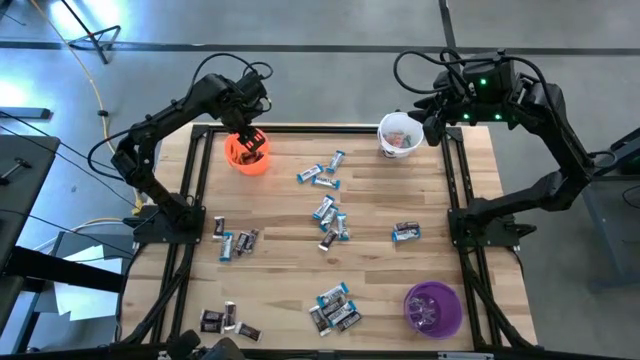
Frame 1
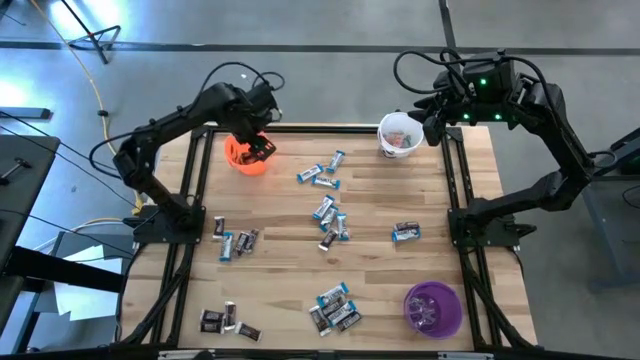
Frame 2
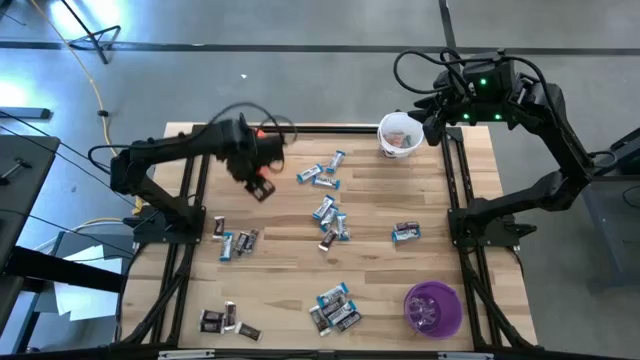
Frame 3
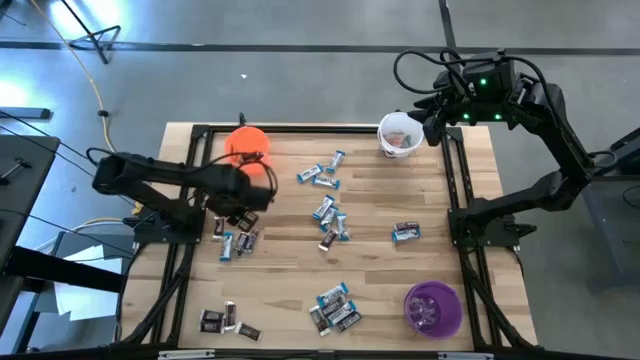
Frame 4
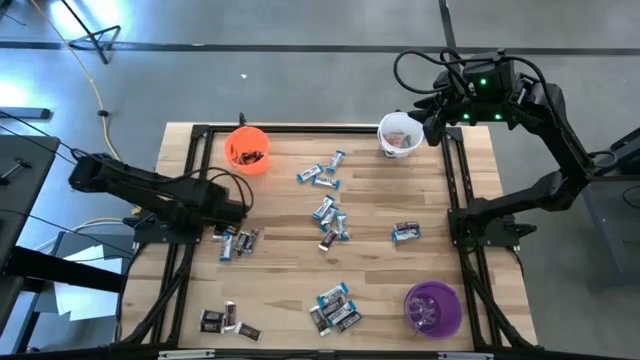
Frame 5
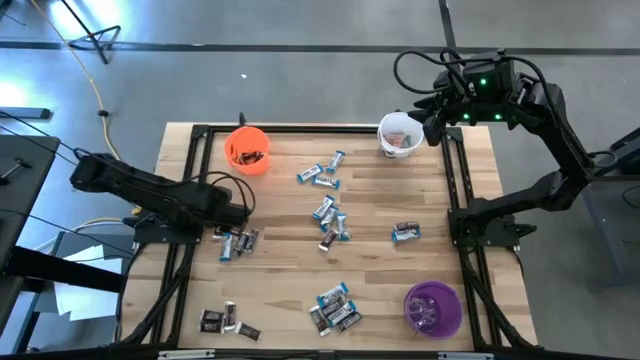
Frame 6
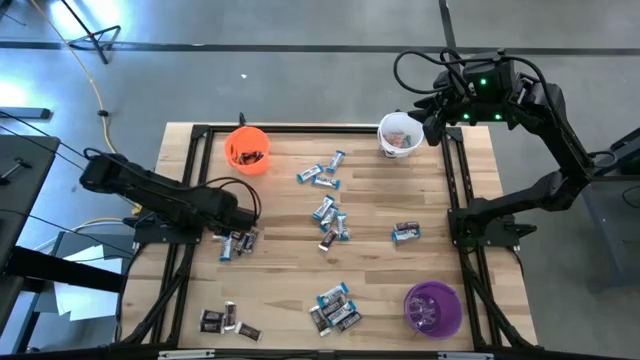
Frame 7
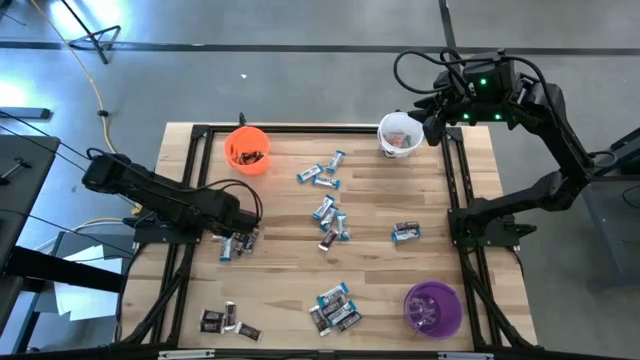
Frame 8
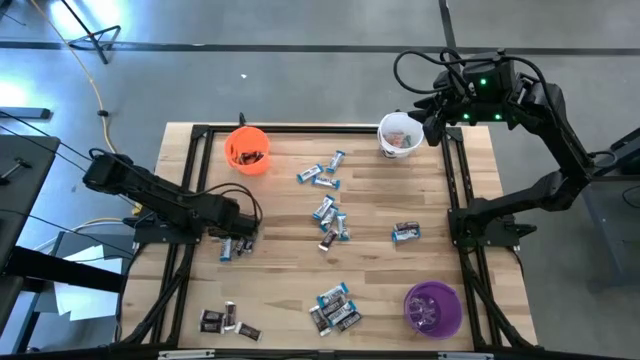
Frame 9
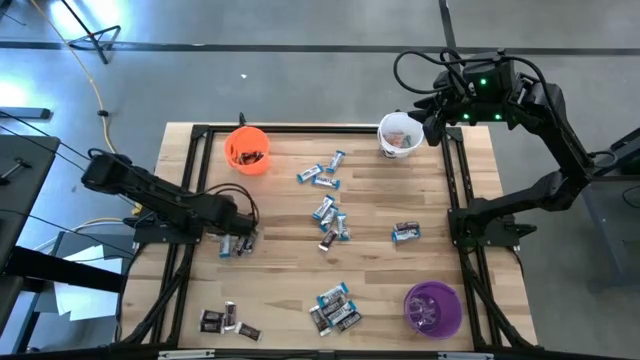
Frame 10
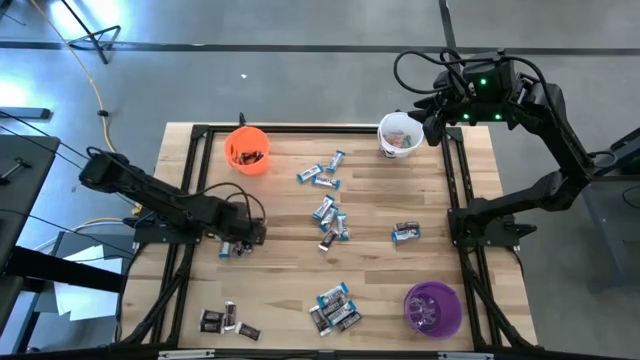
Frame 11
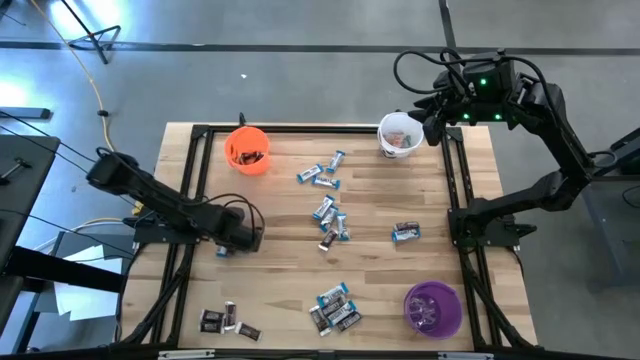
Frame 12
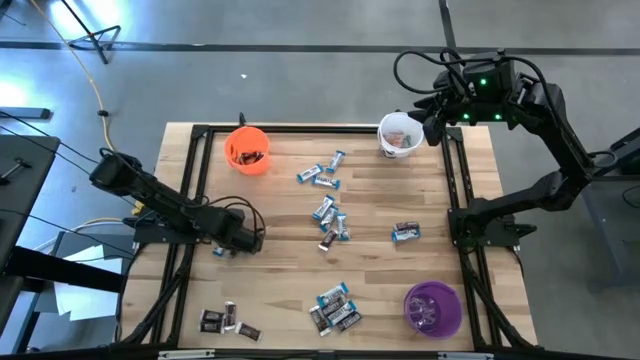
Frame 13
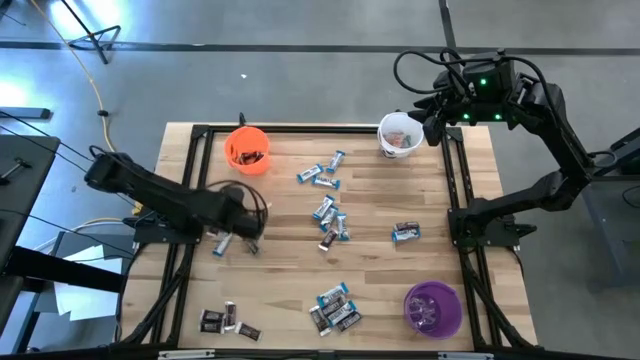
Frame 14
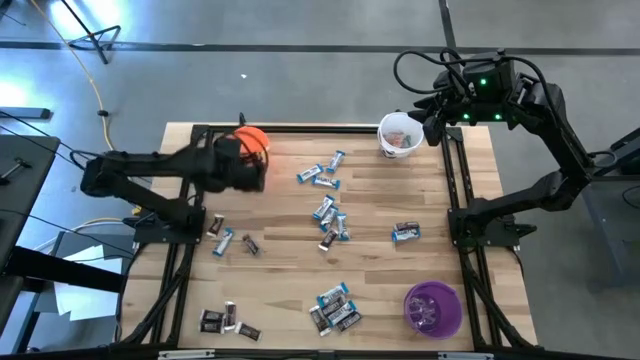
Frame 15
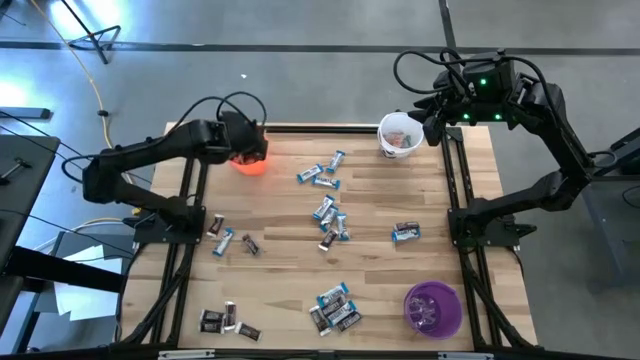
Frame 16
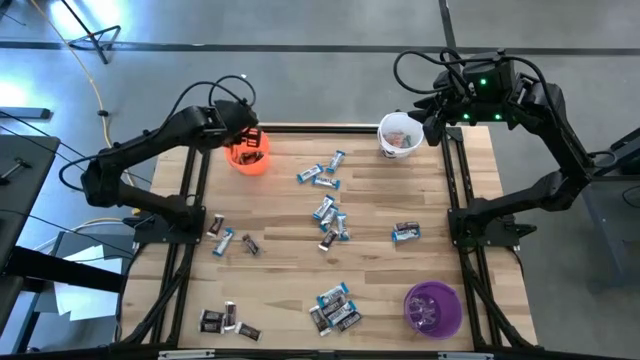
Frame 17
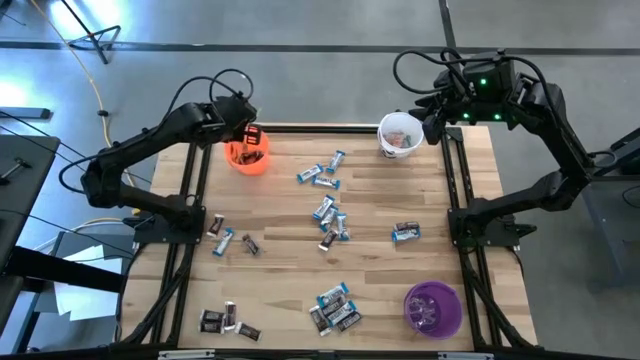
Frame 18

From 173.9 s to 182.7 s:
Task: Sort candy
Put the brown chocolate into the orange bucket

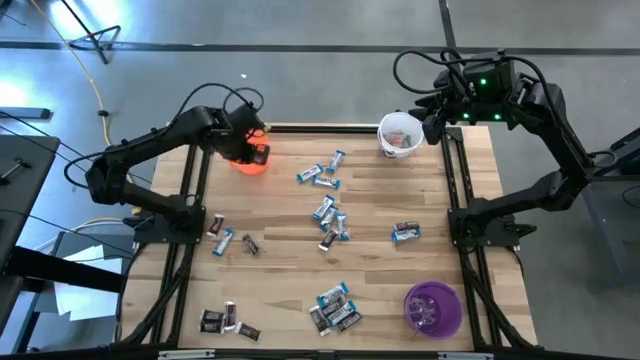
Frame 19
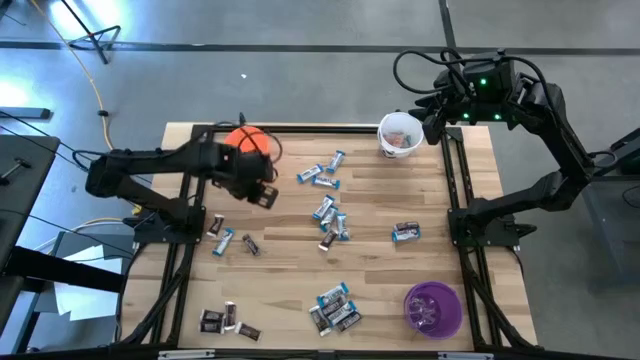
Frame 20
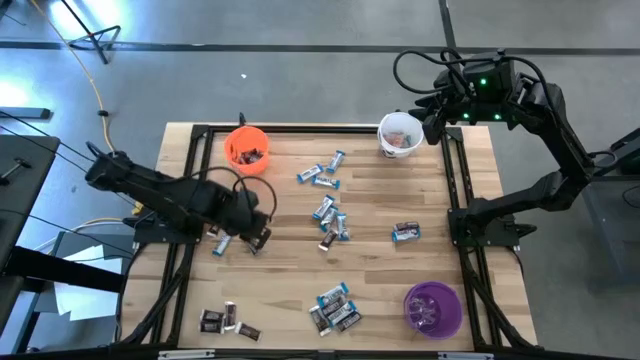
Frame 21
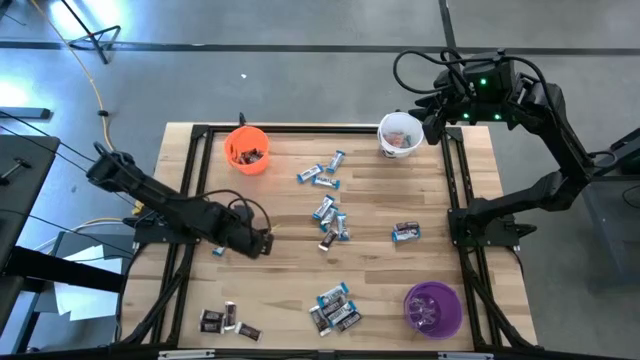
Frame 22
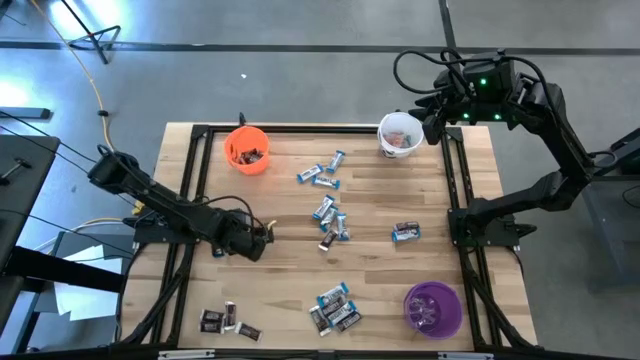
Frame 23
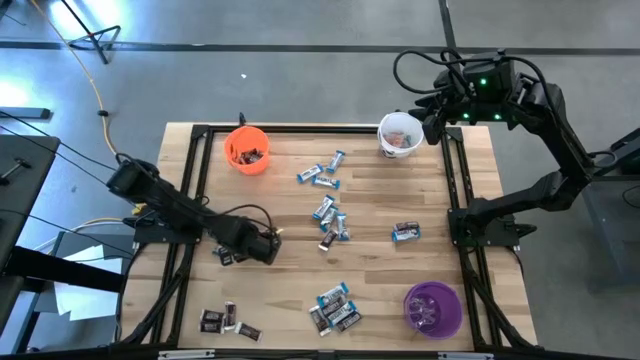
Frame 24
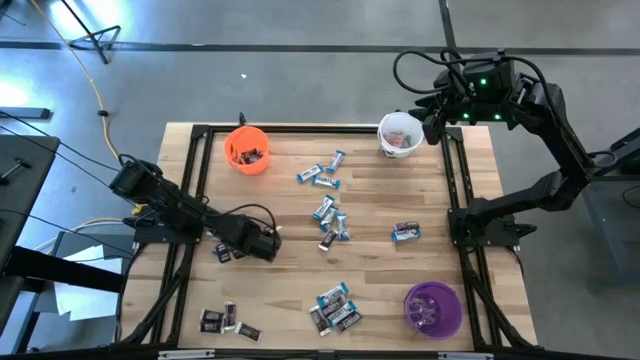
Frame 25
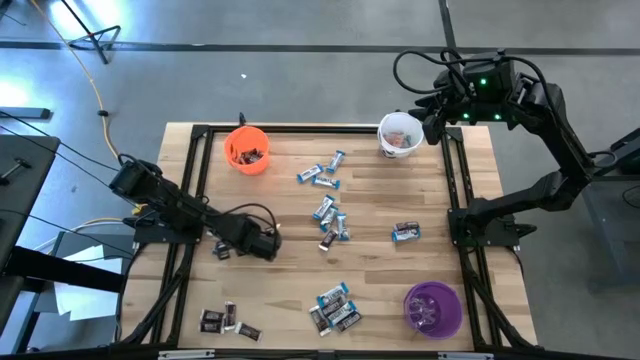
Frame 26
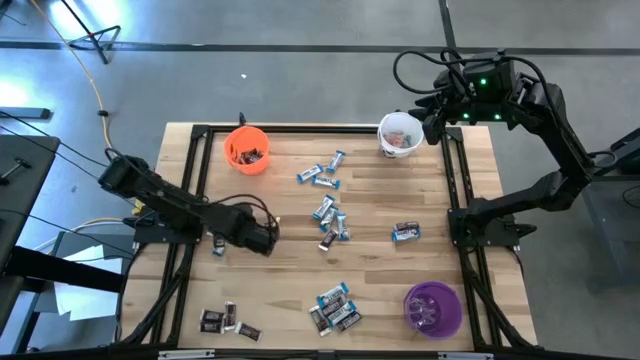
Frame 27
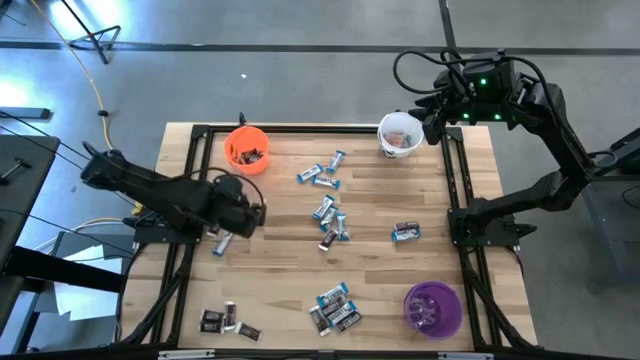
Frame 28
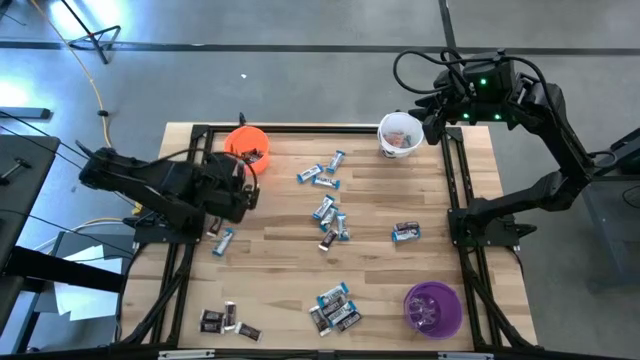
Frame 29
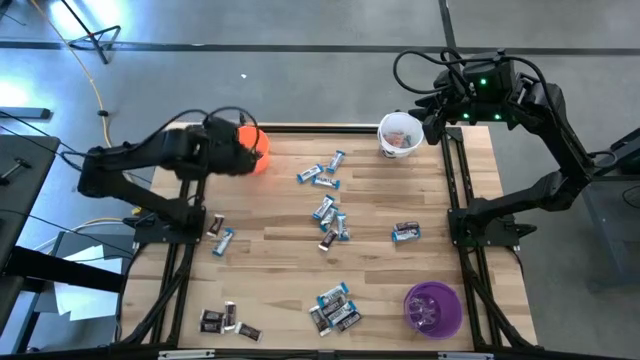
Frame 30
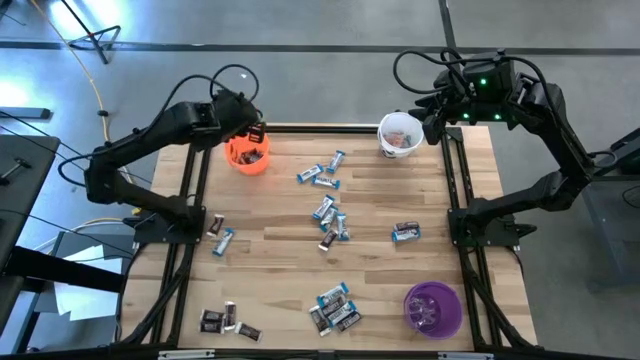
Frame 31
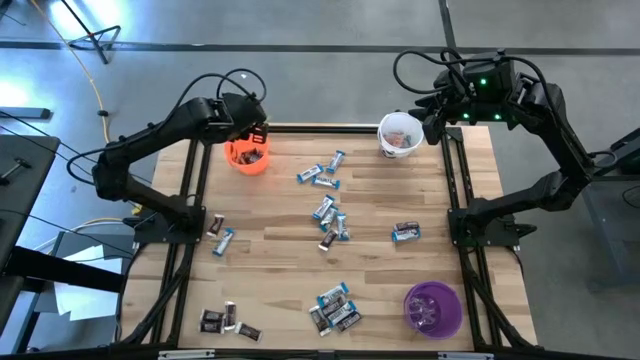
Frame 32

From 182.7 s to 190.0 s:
Put the brown chocolate into the orange bucket

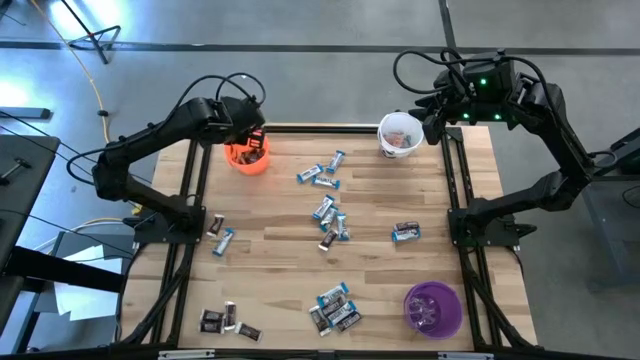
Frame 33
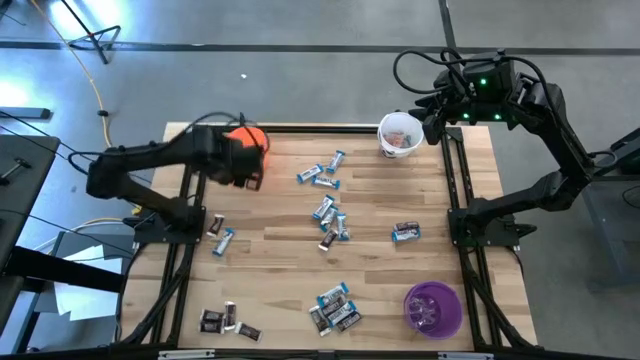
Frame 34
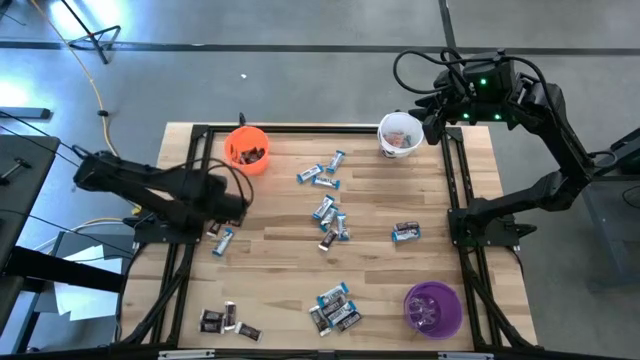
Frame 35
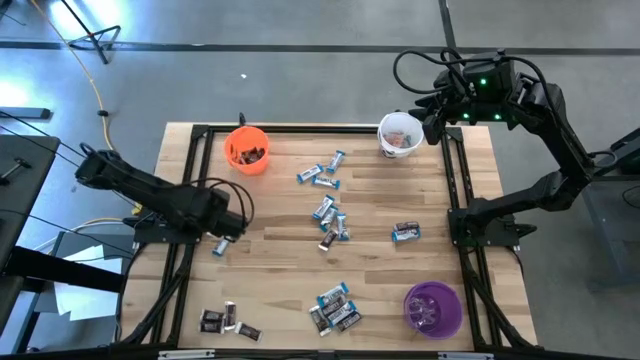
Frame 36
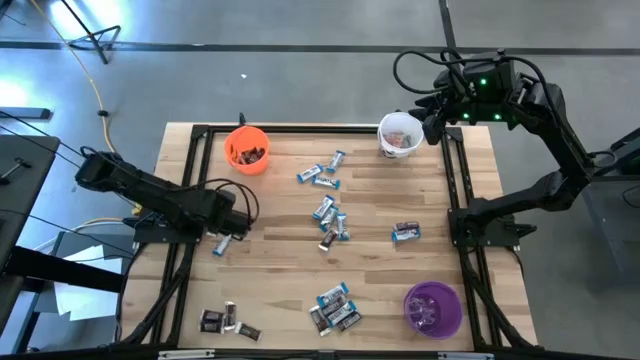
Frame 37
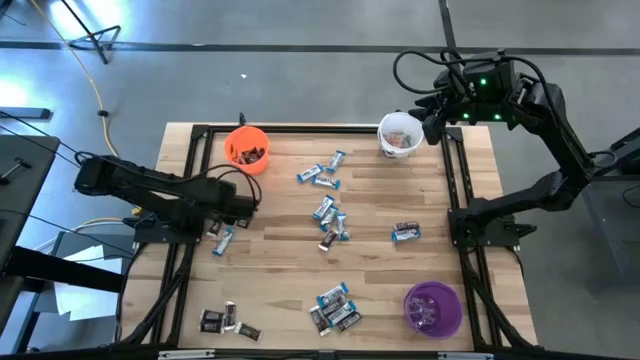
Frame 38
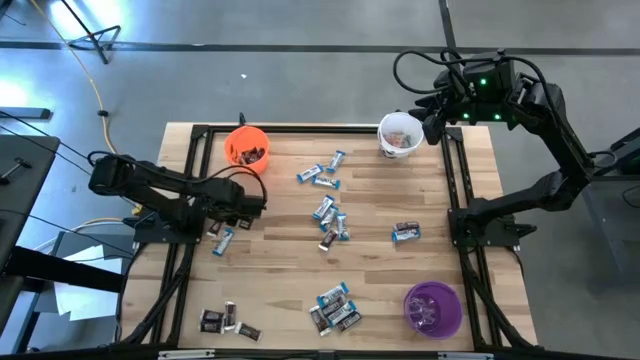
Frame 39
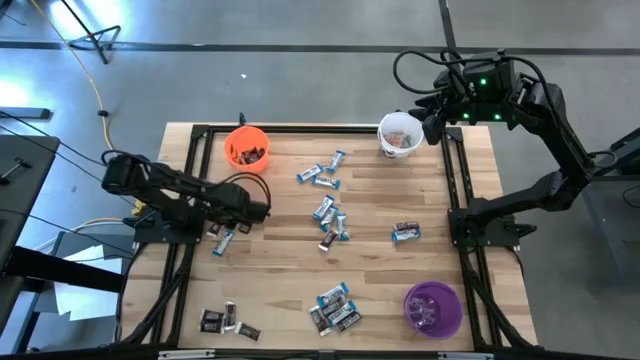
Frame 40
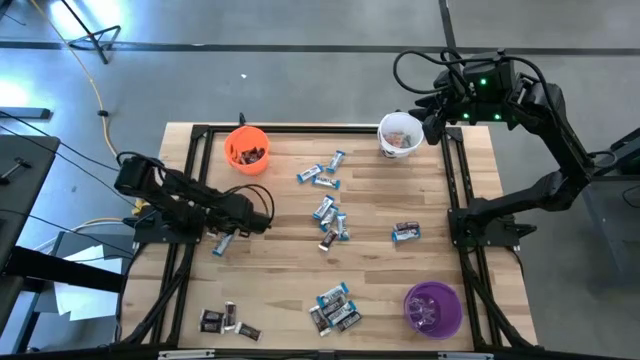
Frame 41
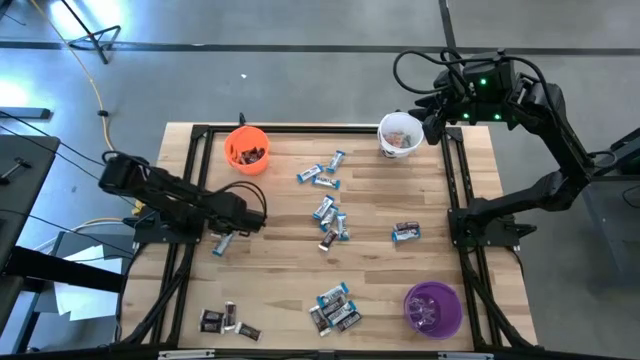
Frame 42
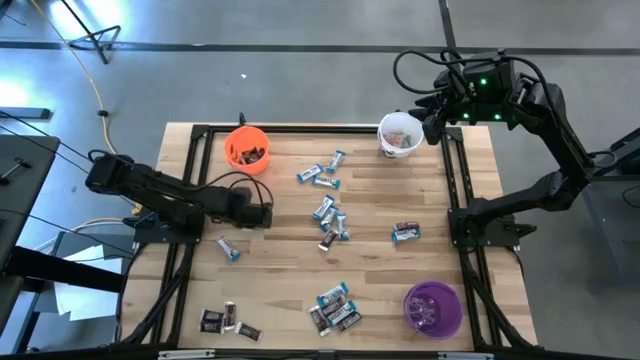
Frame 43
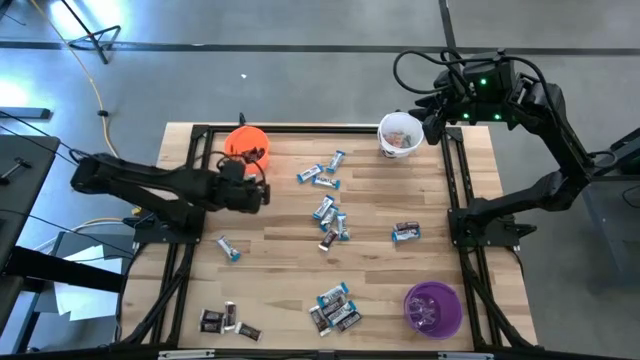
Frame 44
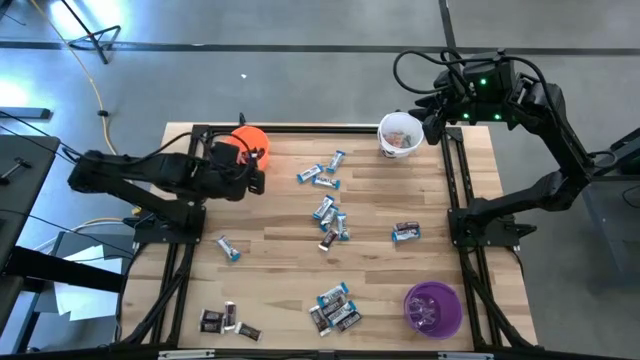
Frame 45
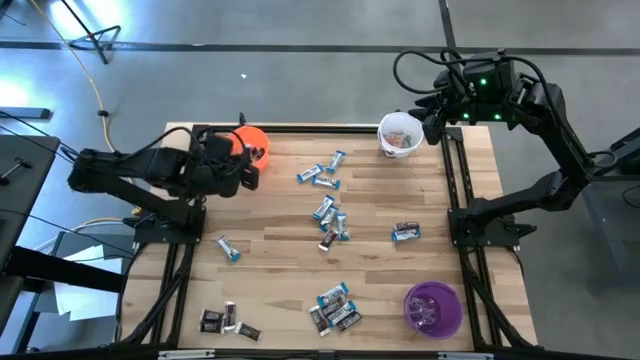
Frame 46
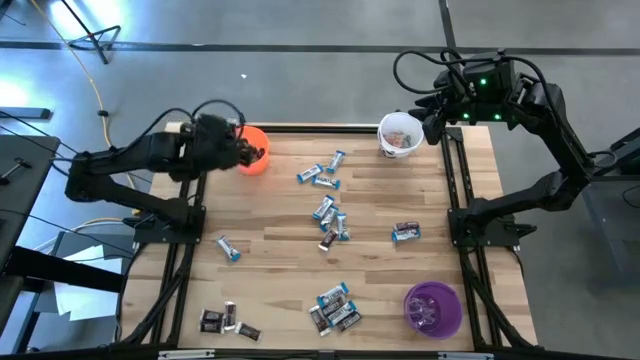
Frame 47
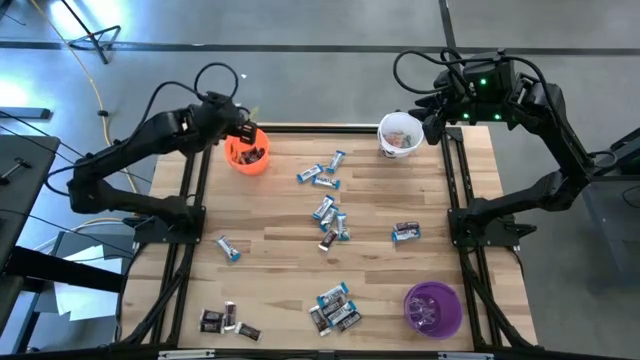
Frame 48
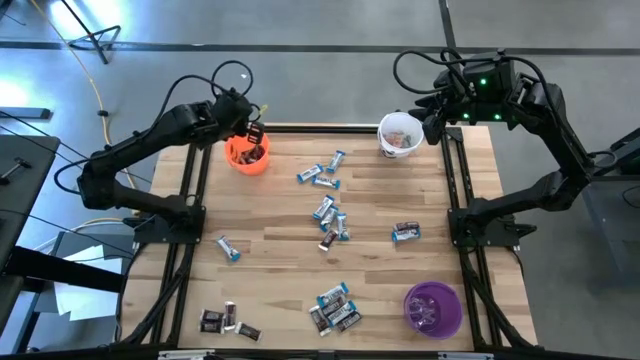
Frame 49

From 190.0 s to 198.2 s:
Put the brown chocolate into the orange bucket
